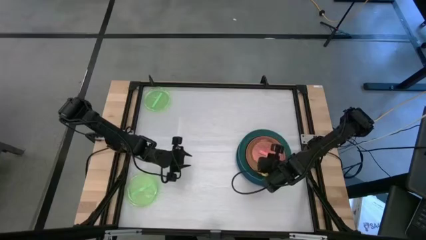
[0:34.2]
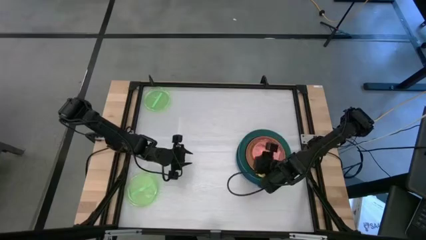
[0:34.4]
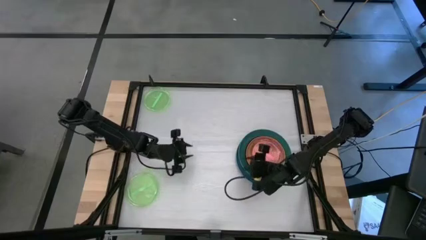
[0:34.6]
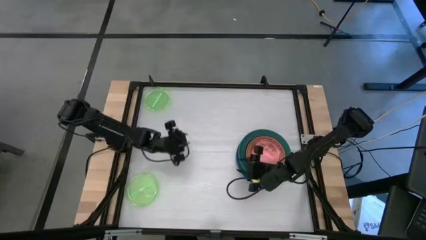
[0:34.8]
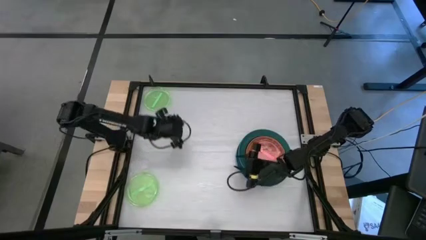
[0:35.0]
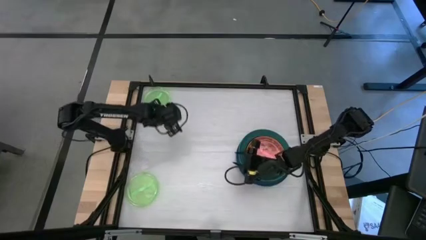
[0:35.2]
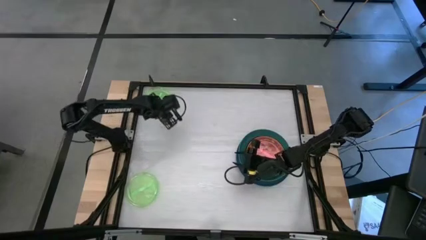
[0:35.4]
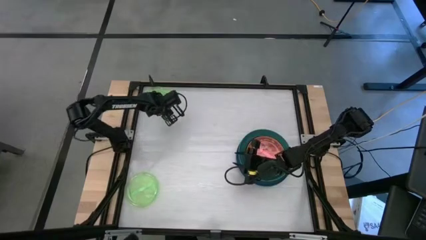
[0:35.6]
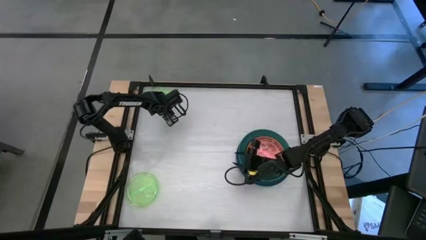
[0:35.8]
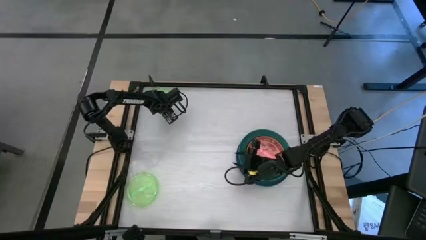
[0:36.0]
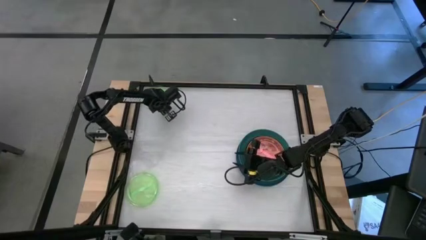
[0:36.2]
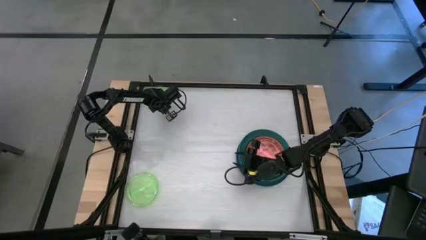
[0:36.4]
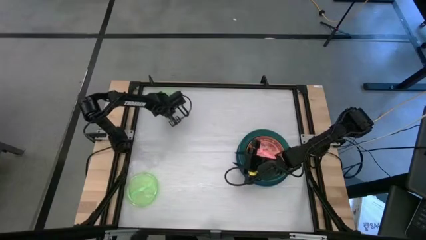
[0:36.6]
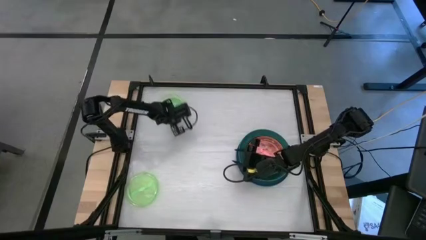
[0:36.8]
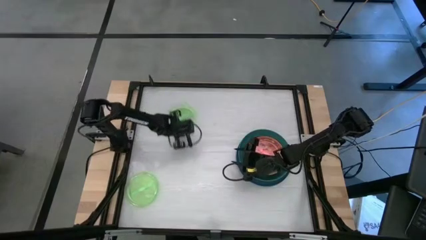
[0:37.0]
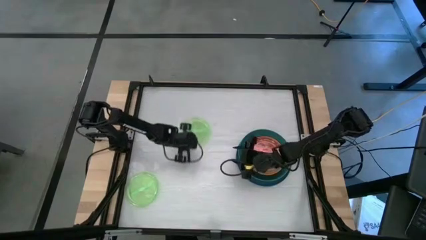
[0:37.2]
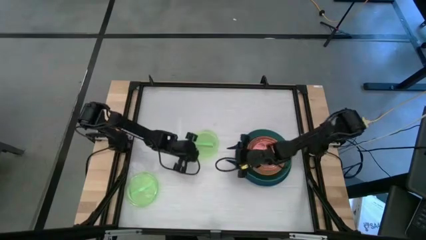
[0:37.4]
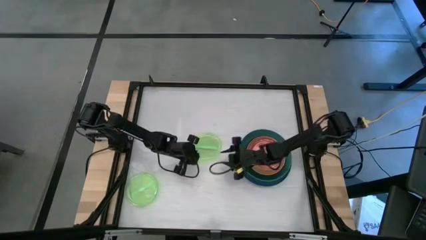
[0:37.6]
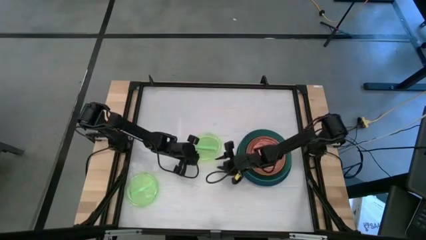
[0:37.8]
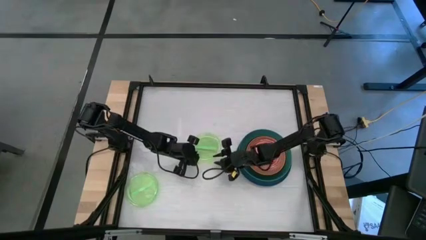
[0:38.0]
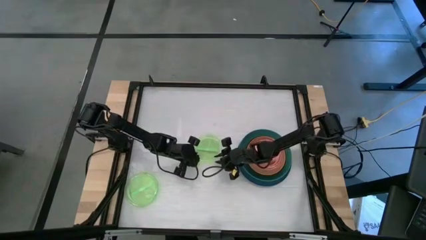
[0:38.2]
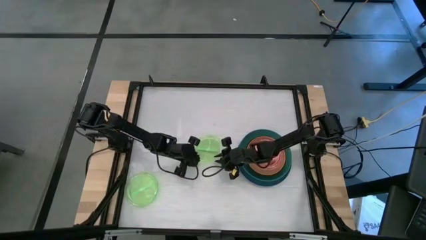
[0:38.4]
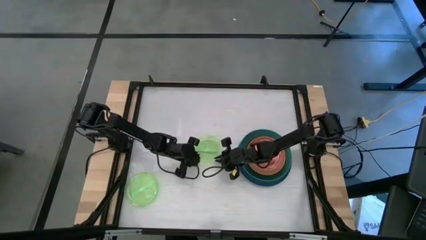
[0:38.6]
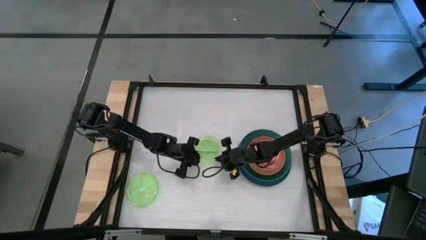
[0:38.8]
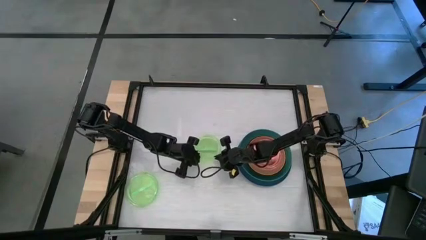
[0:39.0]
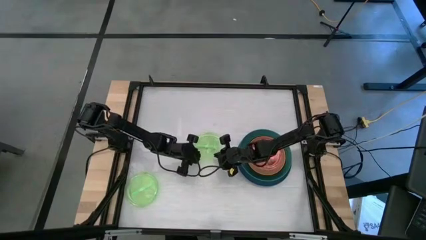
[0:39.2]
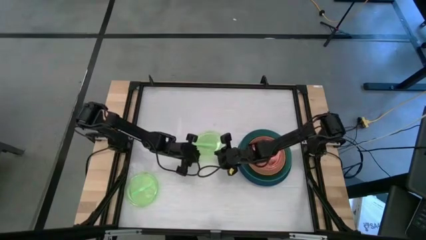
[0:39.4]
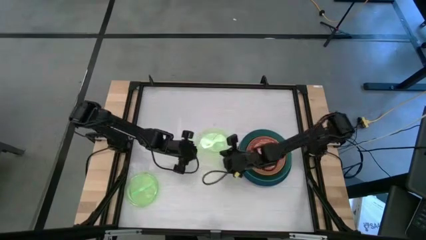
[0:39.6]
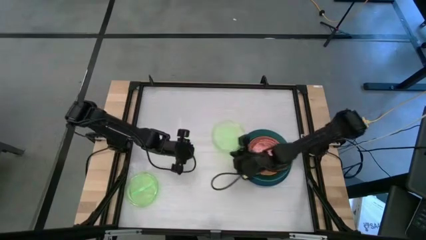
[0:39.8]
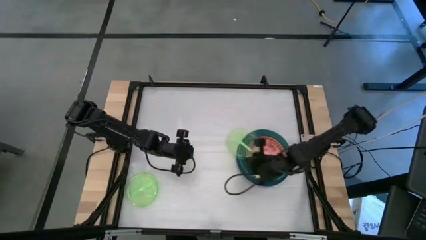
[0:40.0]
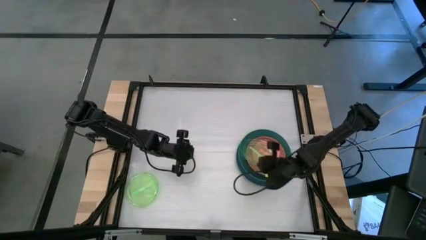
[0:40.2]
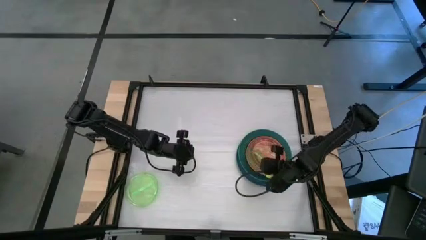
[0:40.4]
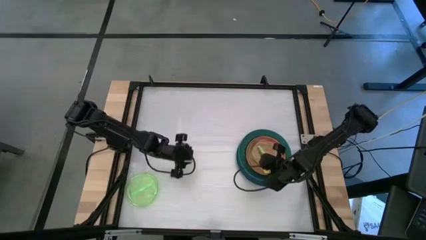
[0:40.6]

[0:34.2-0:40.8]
Task: Stack plastic plates
Stack the light green plate on top of the pink plate

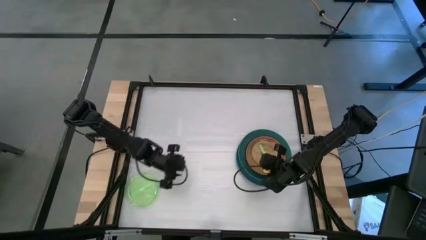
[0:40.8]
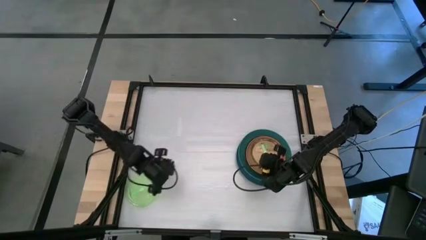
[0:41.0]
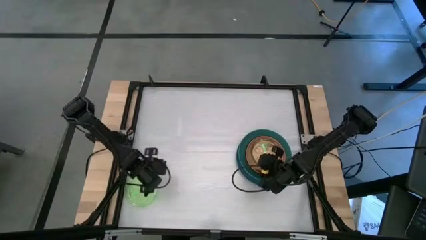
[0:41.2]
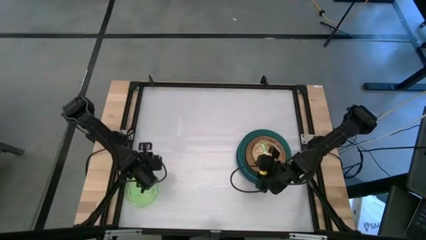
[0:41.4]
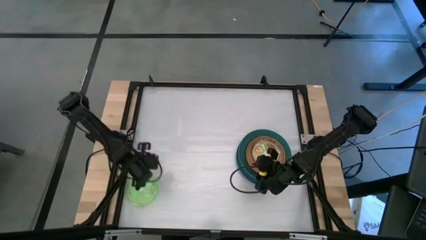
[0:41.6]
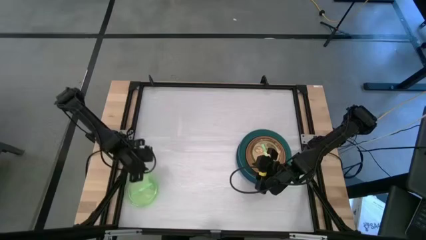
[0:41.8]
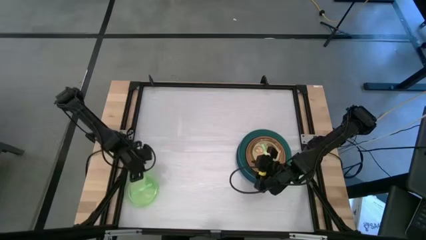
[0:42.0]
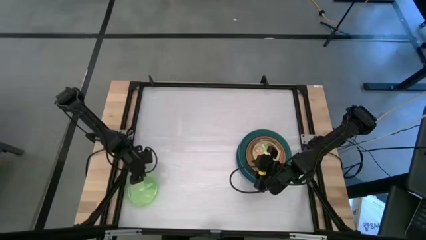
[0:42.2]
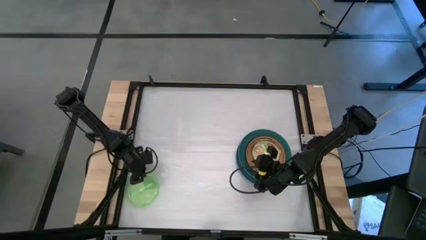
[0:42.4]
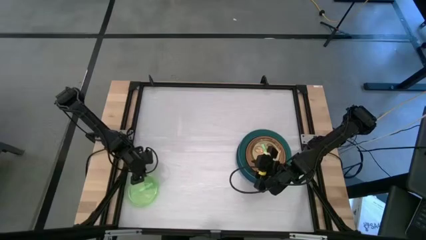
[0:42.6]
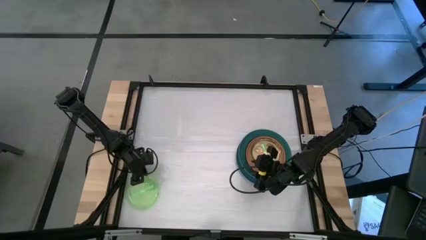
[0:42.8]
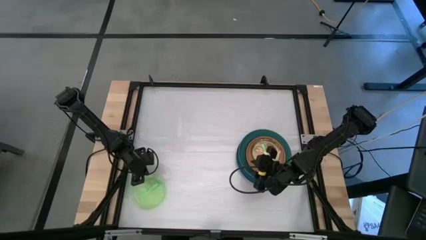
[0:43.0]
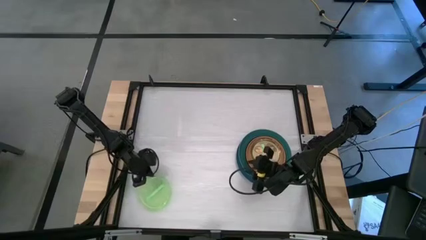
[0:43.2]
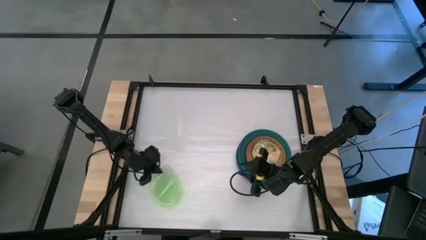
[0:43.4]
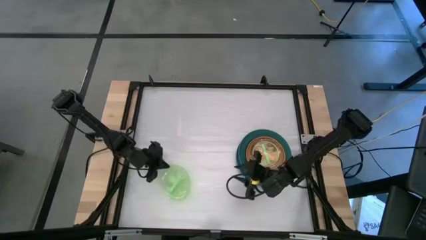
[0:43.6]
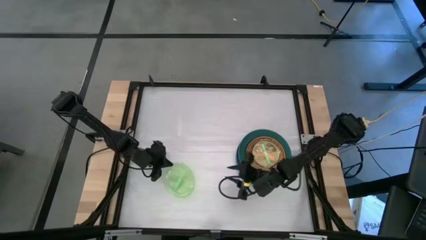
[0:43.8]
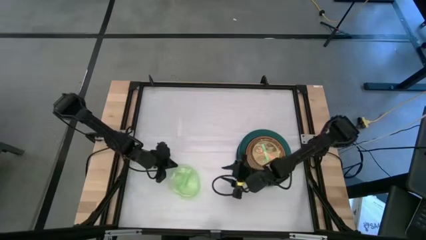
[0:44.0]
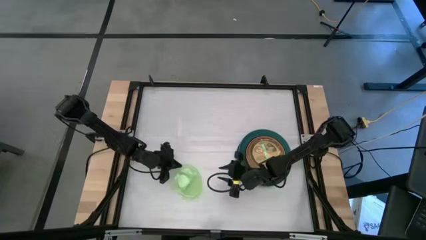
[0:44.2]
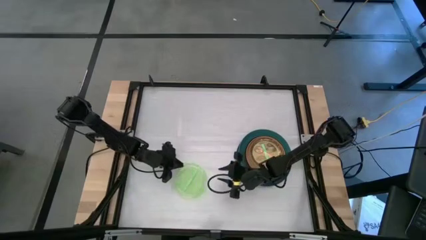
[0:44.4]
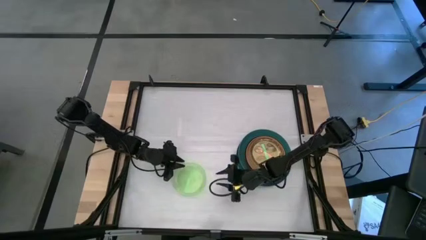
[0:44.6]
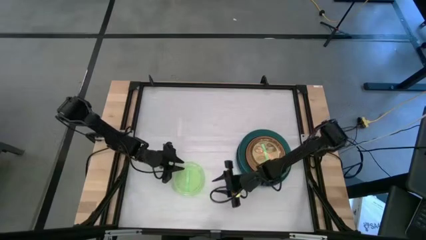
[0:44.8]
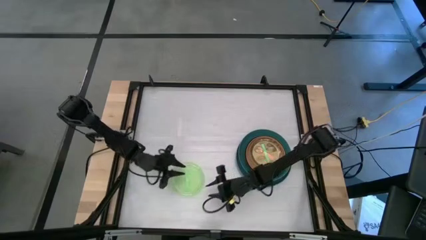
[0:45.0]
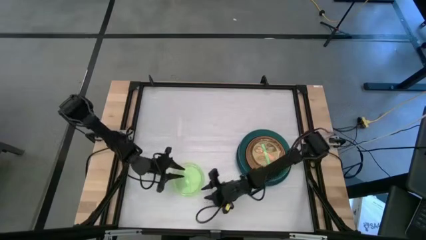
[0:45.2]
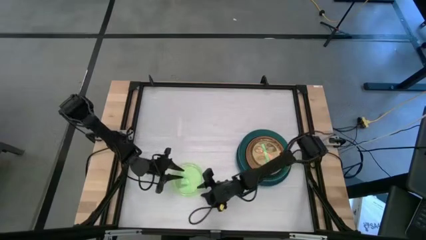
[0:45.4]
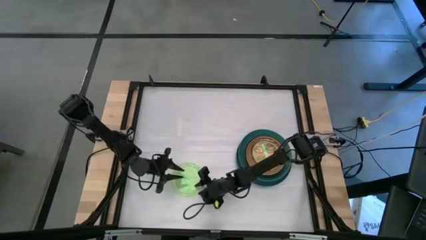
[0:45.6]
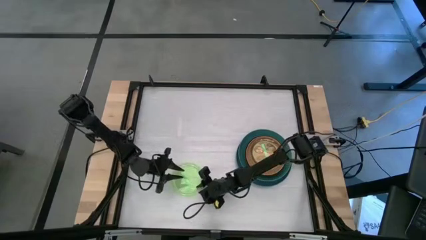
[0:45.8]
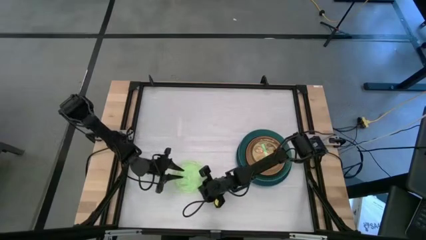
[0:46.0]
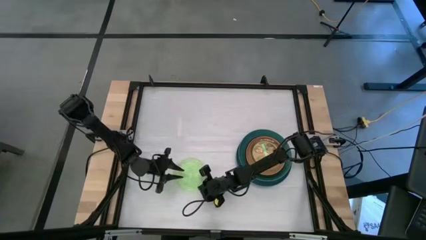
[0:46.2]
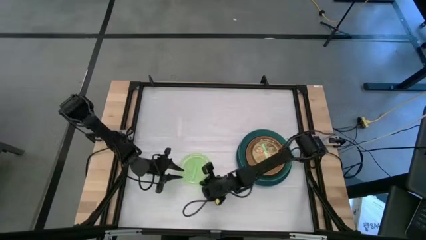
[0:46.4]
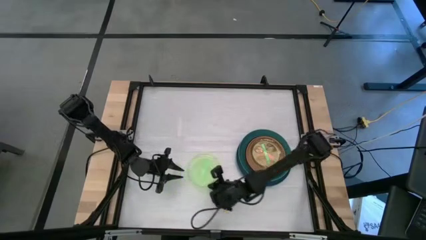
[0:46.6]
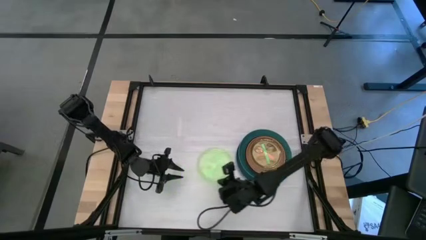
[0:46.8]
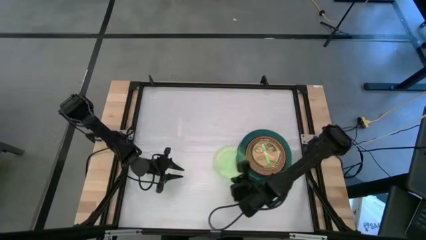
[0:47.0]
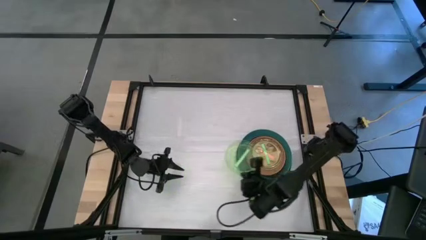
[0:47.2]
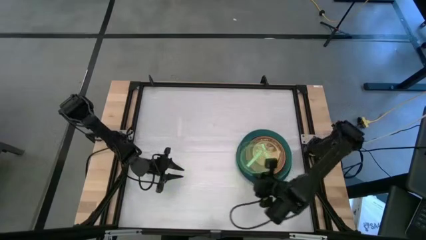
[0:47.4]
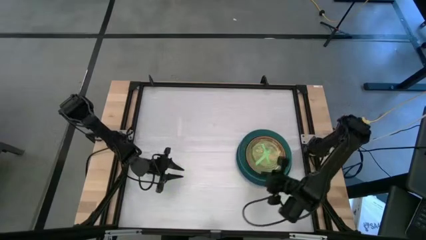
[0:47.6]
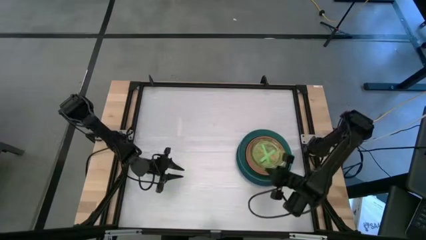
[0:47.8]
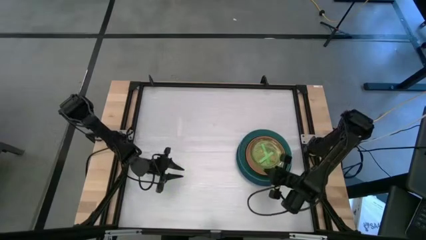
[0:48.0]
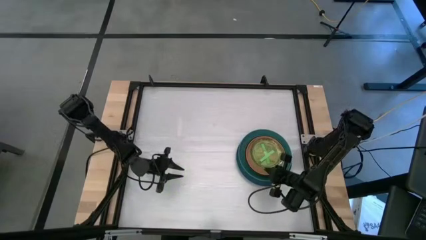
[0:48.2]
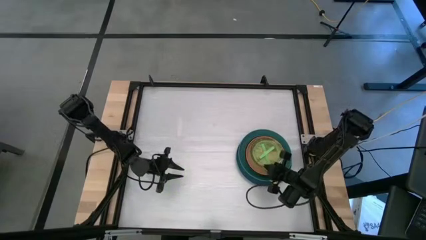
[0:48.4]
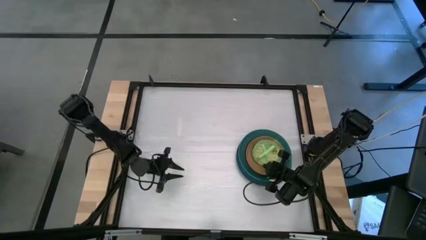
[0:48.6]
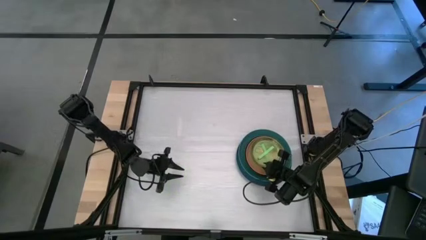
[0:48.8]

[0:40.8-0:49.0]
Stack the light green plate on top of the light green plate

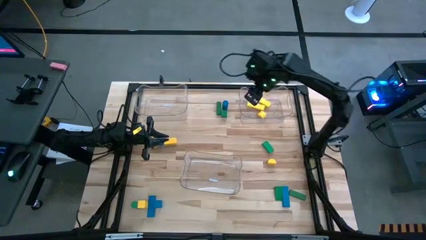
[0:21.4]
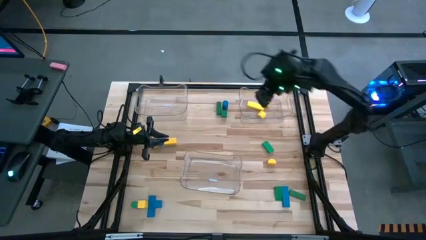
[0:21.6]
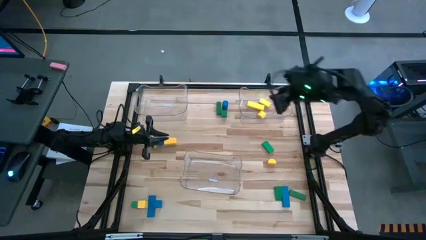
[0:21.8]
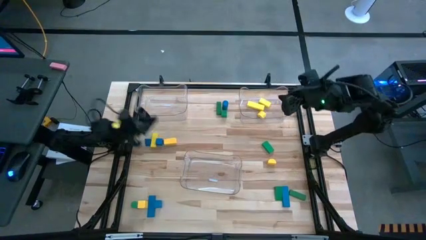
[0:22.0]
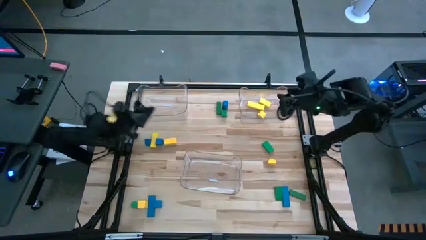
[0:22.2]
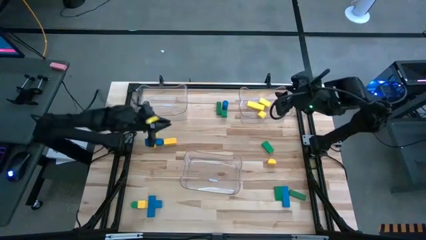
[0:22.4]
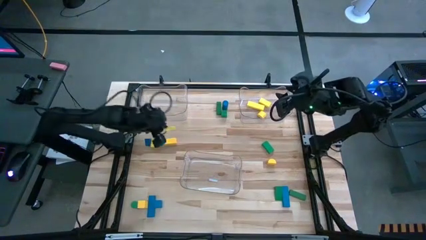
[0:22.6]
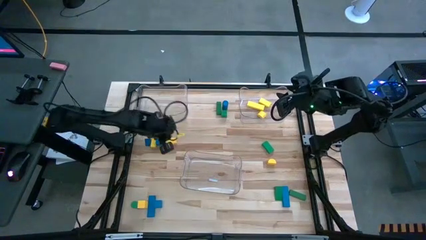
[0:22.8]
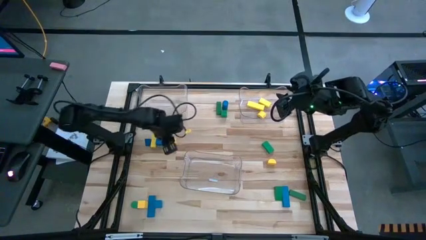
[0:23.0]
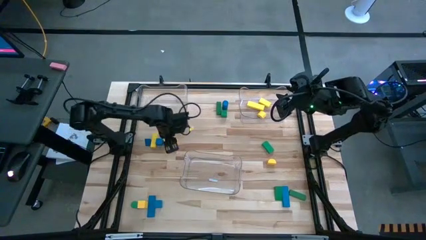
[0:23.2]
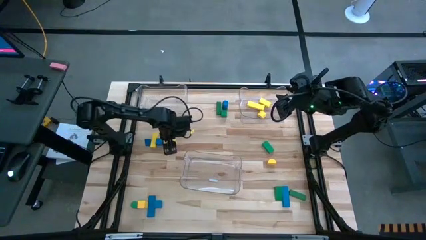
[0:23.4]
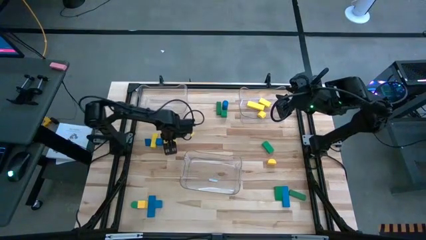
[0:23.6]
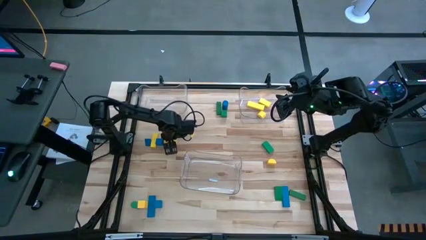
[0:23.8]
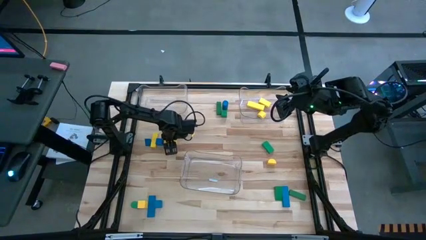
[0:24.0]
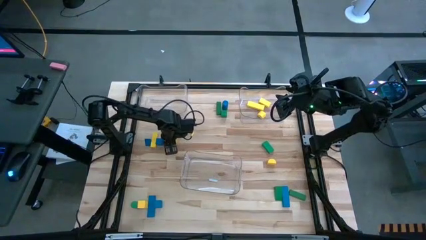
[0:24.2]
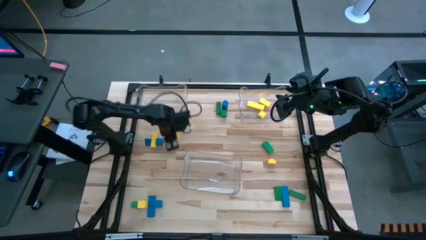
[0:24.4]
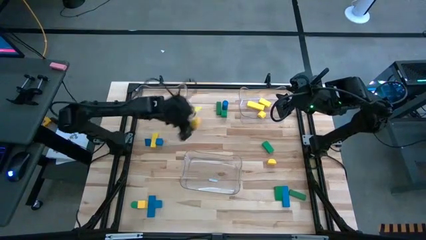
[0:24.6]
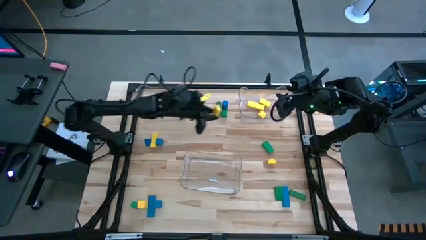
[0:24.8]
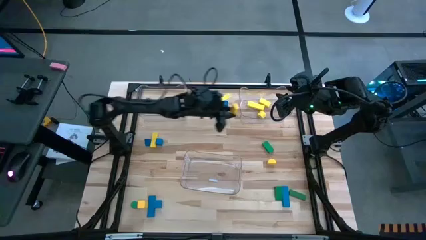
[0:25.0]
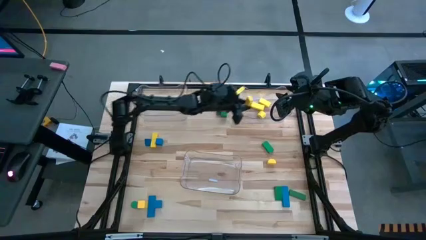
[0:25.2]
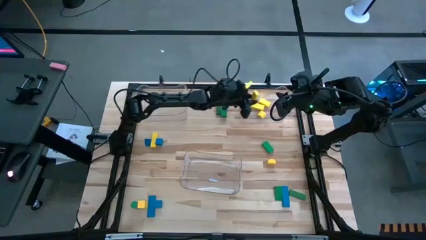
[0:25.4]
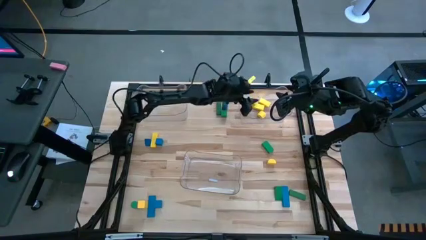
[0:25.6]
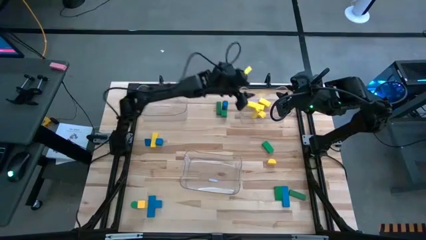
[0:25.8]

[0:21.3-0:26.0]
Task: Sort blocks
Put the yellow block into the right transparent bin
